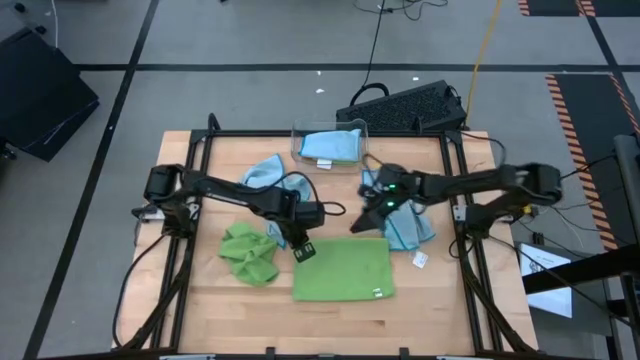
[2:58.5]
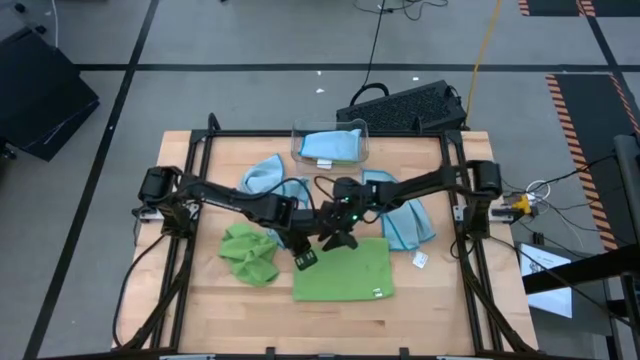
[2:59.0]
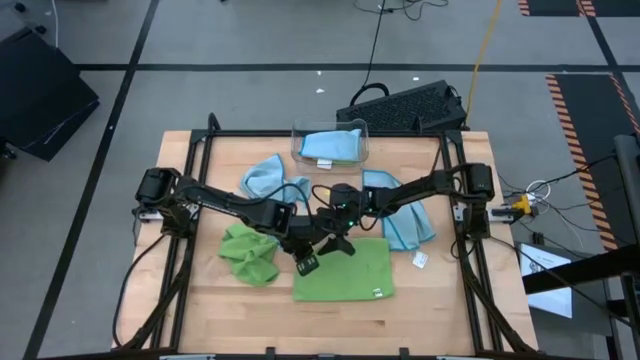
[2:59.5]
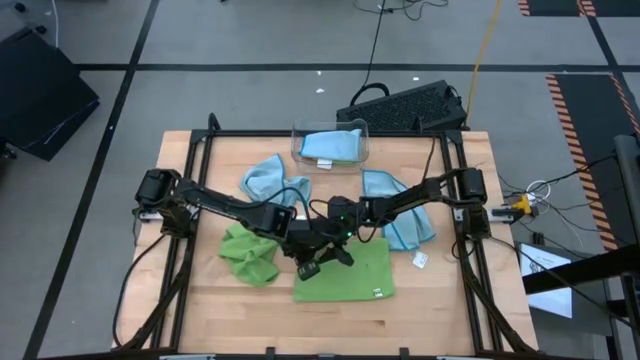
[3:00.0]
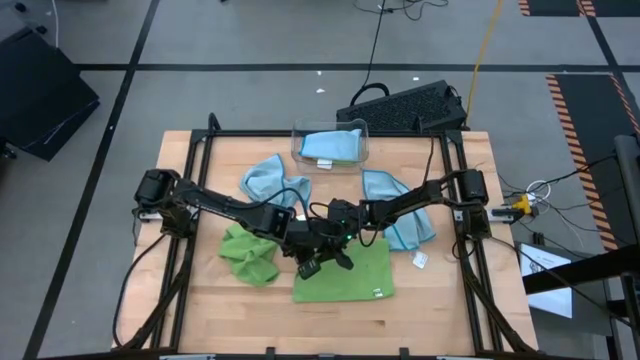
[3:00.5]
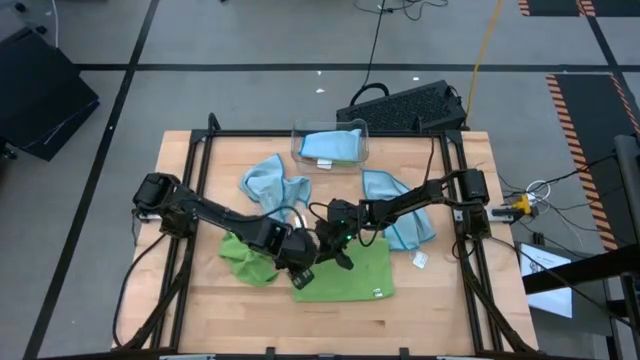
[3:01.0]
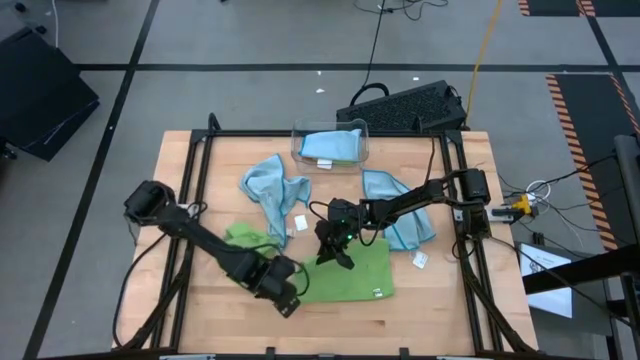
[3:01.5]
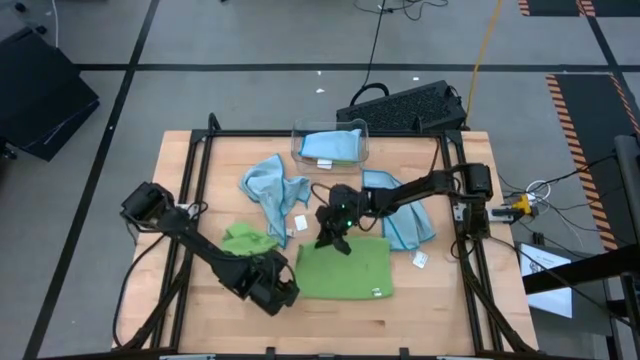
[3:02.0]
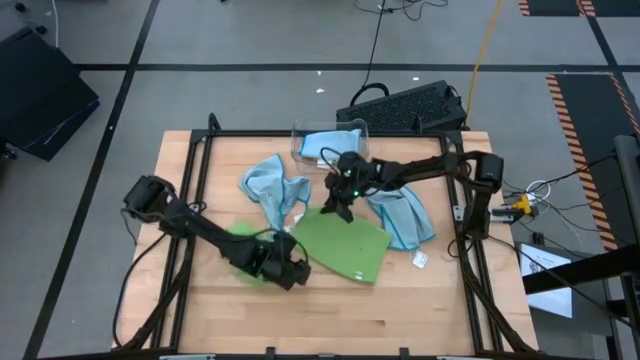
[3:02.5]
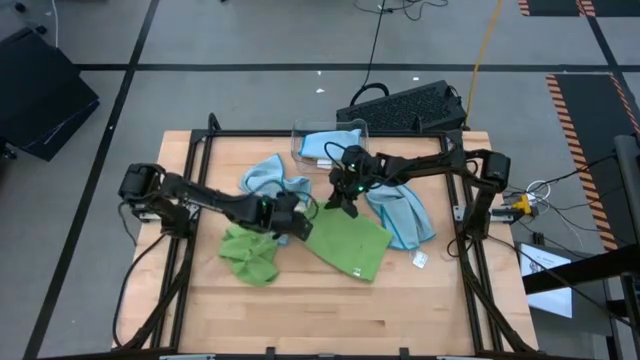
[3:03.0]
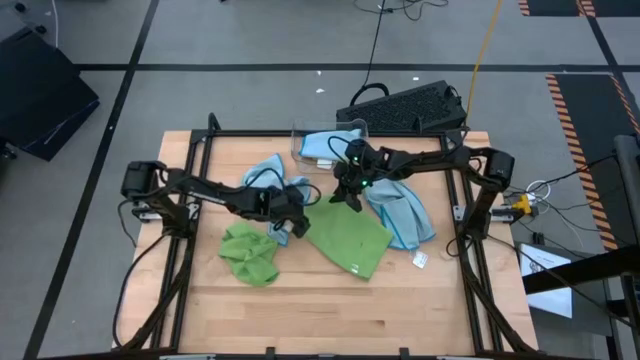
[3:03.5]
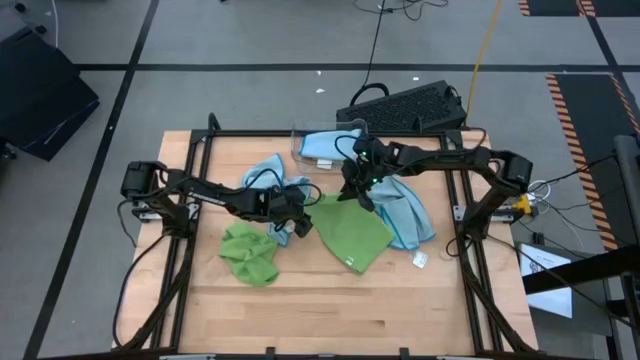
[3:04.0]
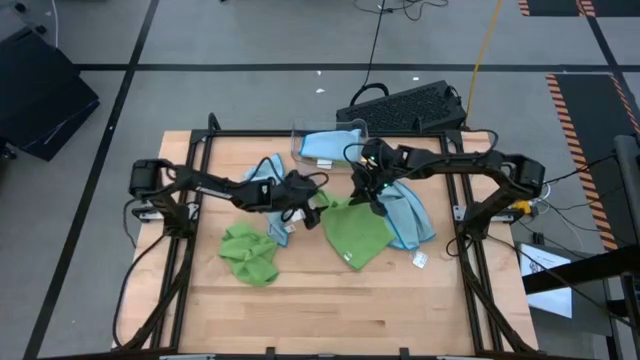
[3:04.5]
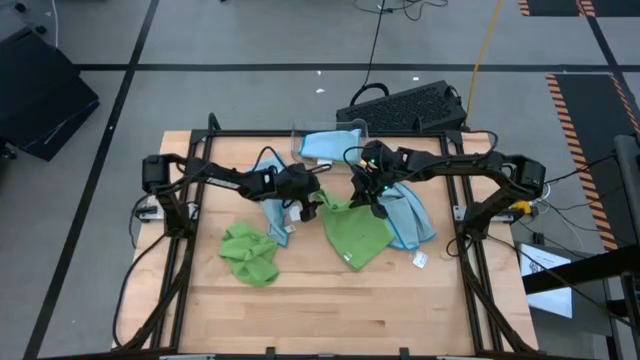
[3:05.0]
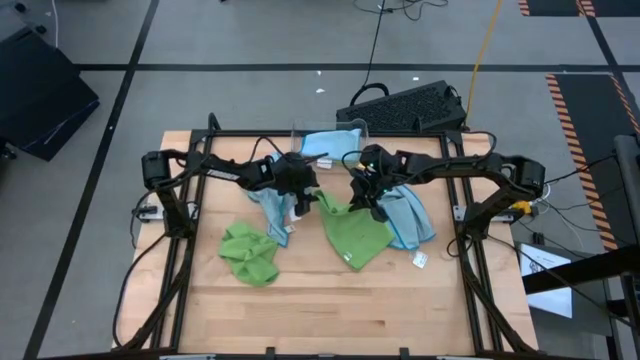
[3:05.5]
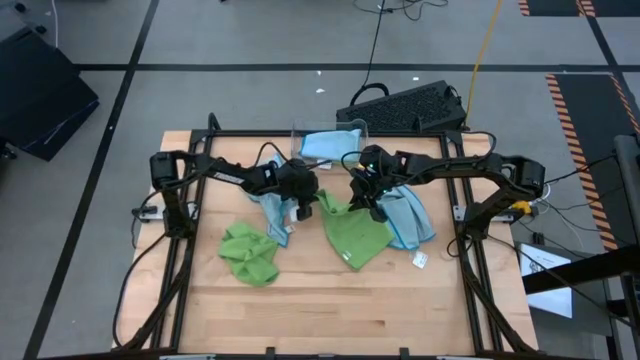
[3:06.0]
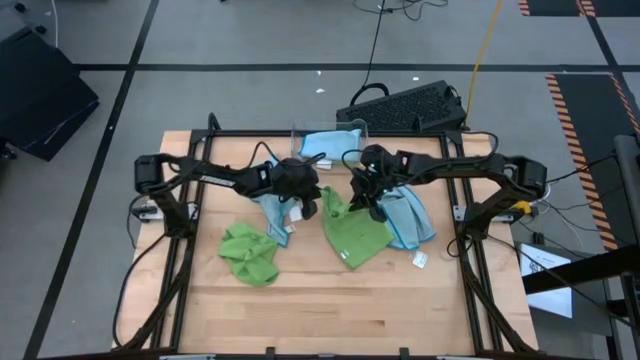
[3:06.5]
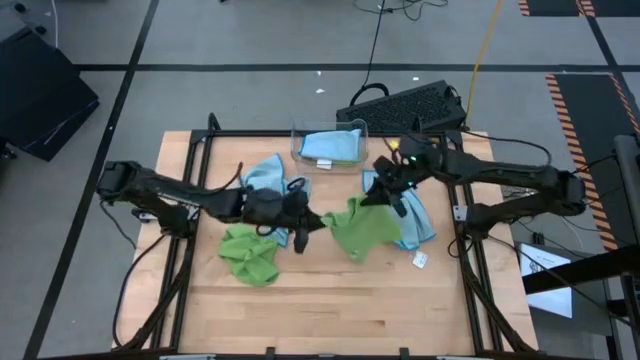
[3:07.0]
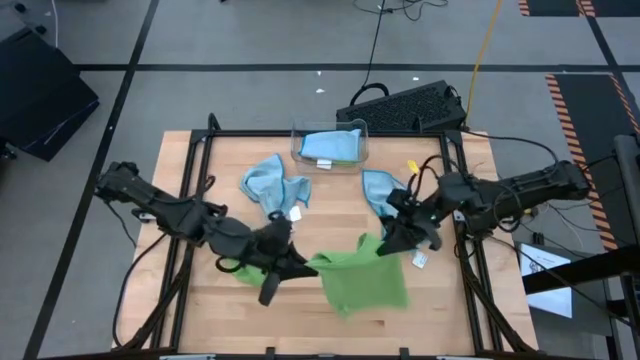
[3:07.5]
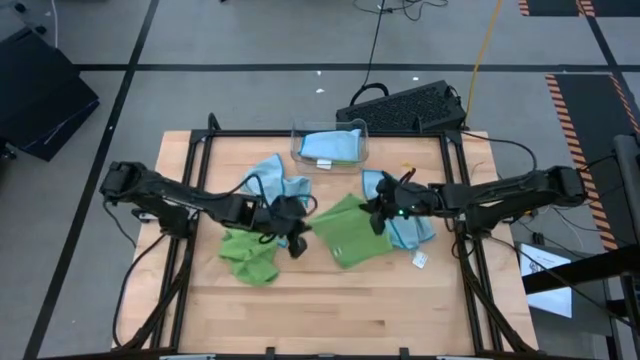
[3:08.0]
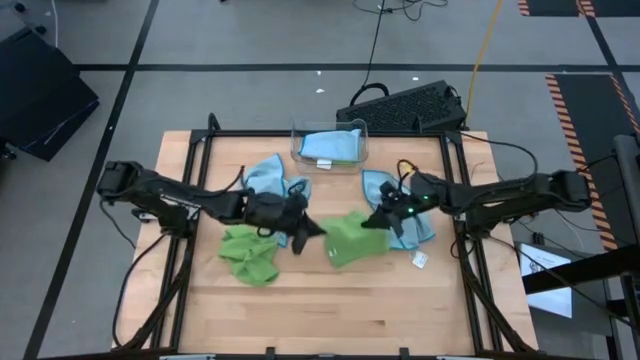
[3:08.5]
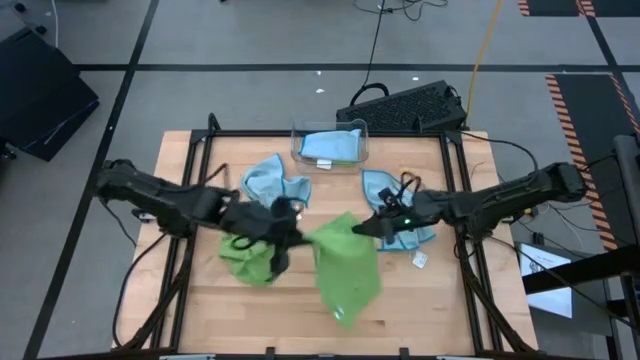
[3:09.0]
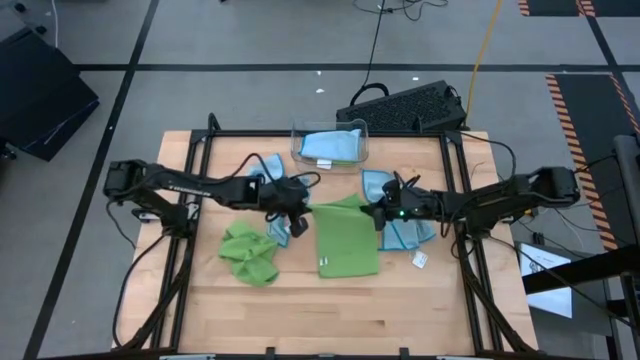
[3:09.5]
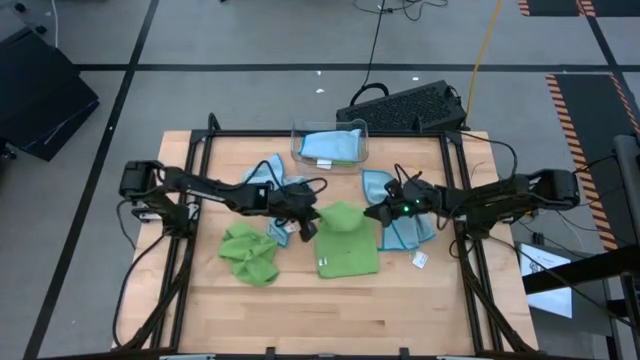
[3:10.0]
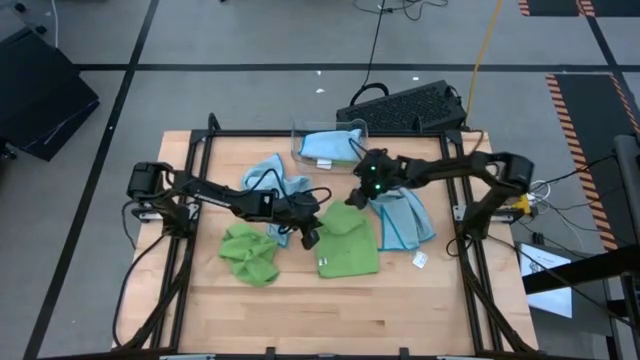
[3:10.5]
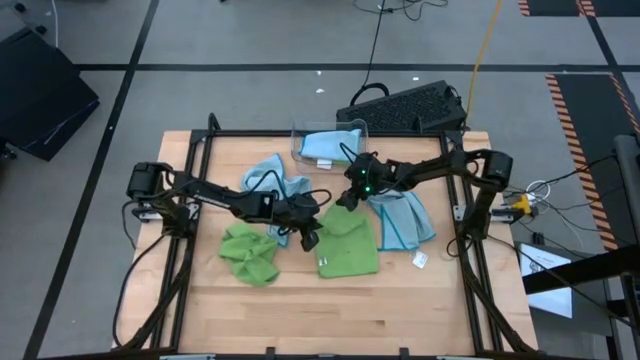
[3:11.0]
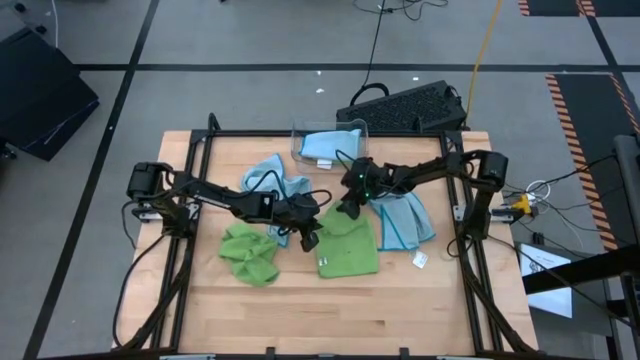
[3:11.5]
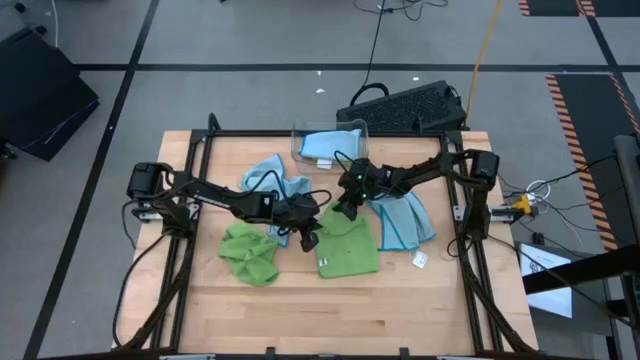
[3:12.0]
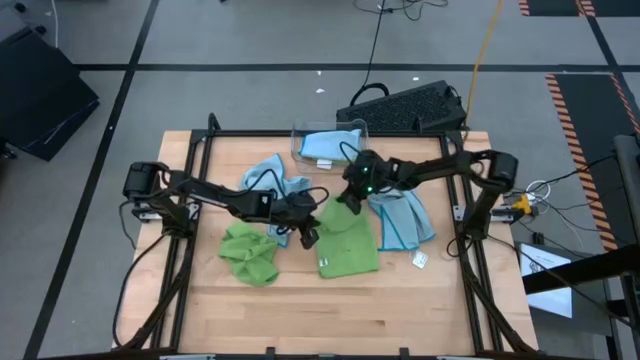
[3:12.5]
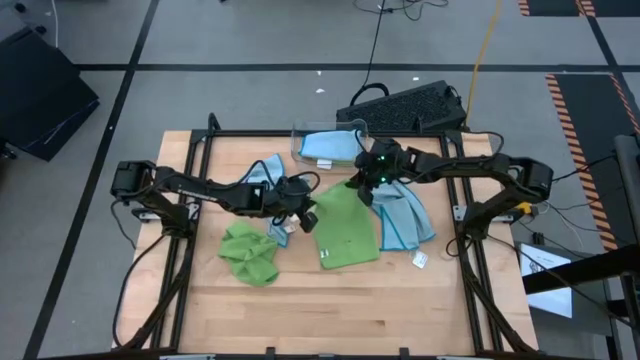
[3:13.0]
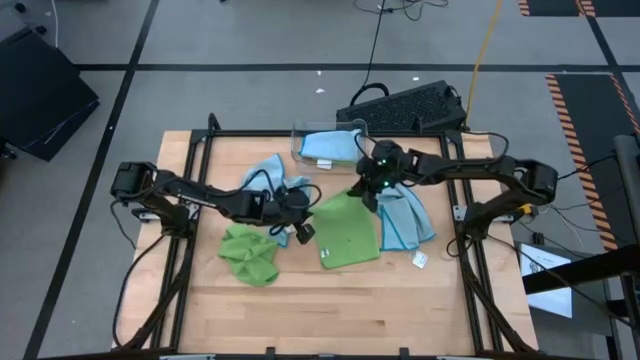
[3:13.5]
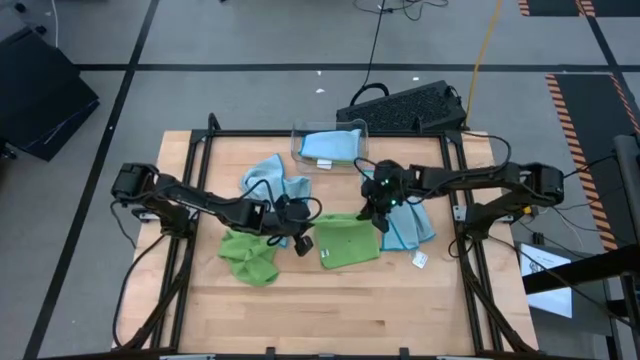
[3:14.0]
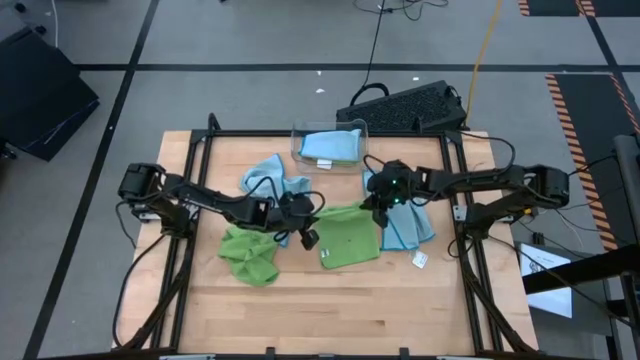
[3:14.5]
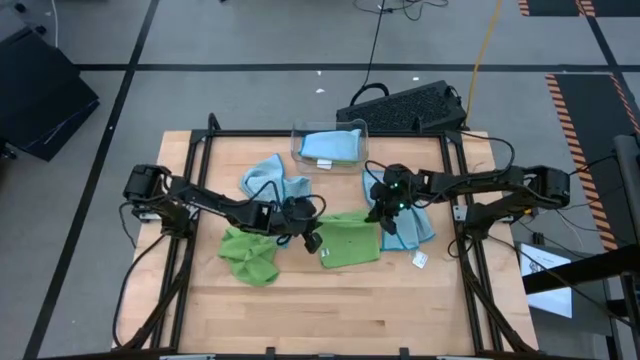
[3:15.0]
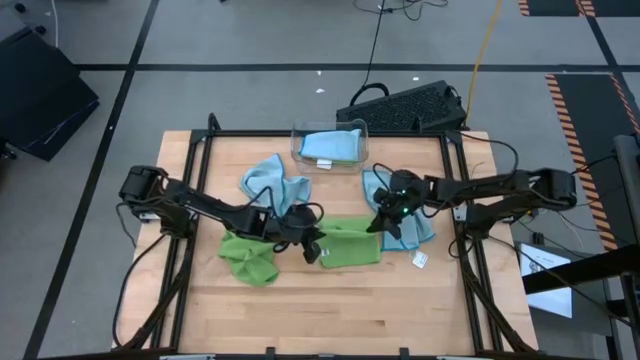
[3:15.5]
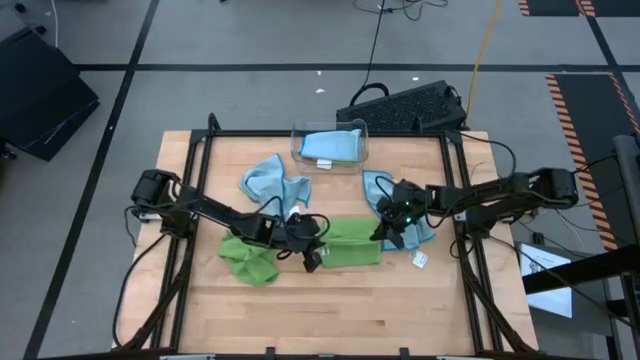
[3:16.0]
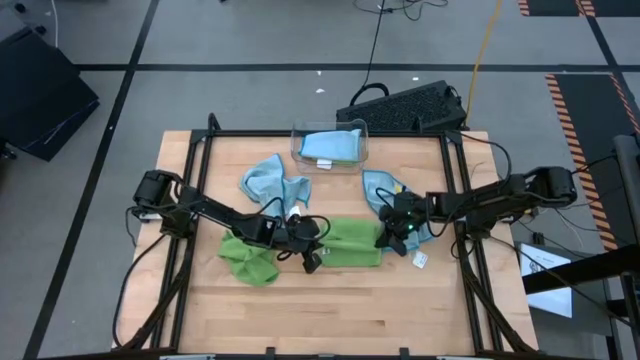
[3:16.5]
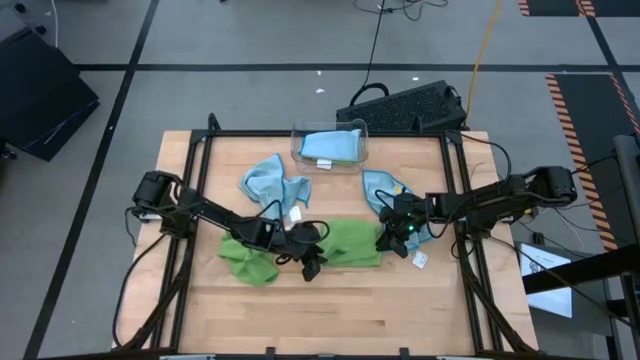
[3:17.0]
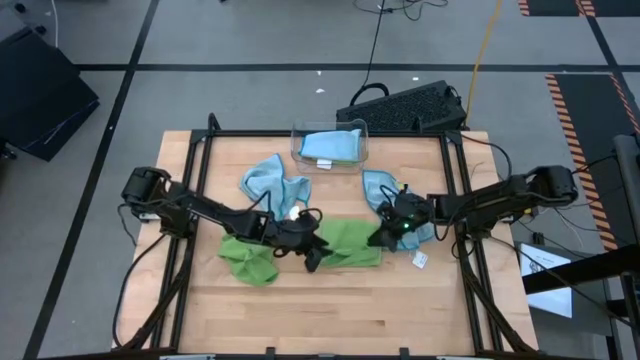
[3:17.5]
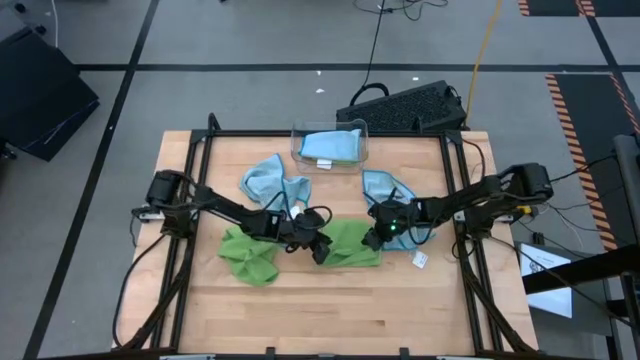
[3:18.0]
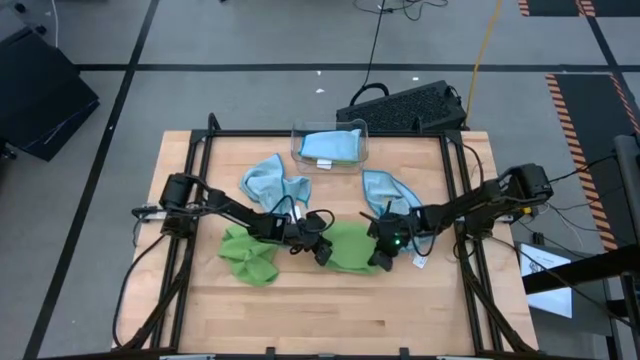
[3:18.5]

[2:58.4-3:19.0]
Task: Fold microfiber towels
Fold the right green microfiber cloth
